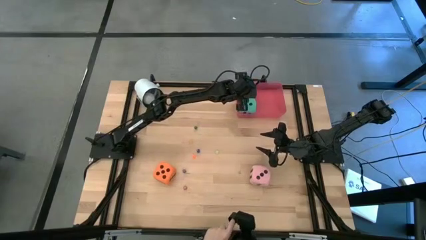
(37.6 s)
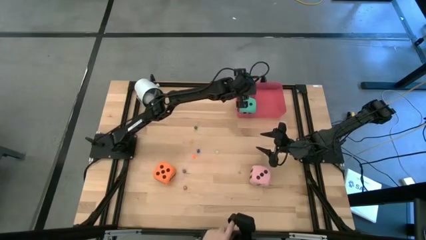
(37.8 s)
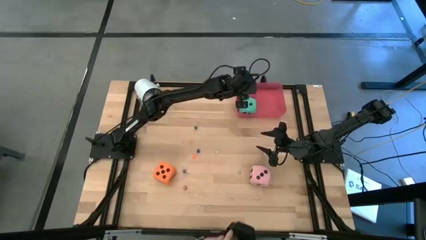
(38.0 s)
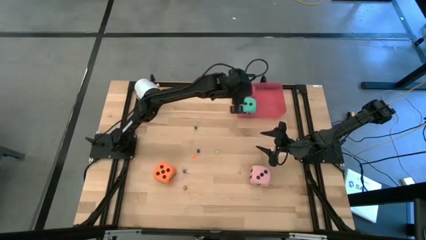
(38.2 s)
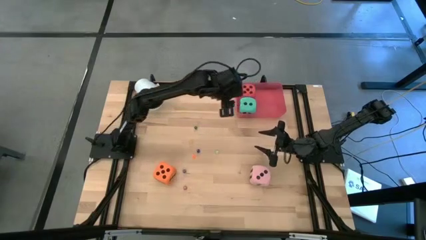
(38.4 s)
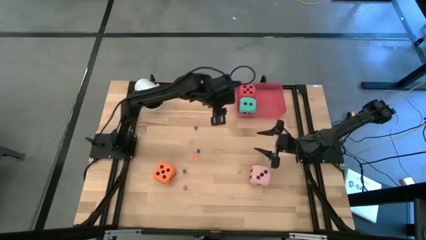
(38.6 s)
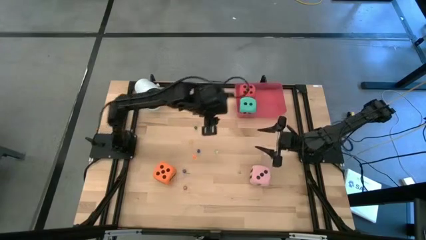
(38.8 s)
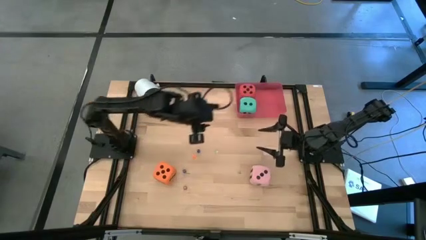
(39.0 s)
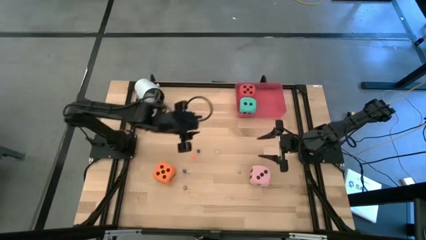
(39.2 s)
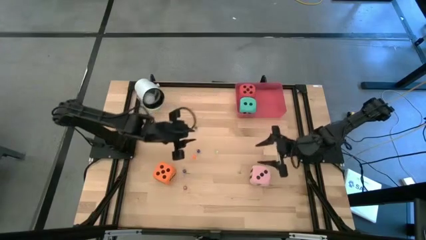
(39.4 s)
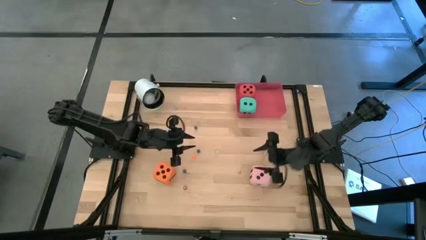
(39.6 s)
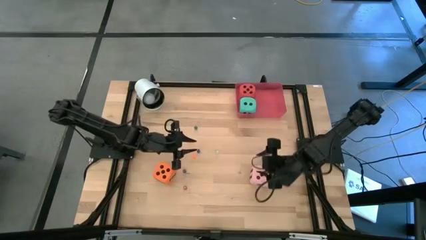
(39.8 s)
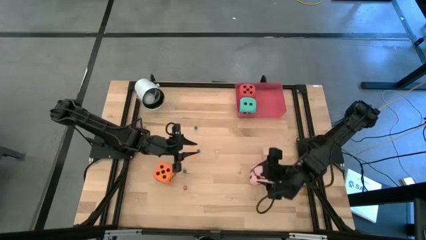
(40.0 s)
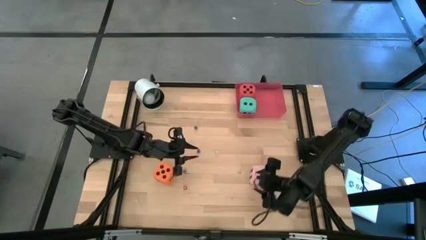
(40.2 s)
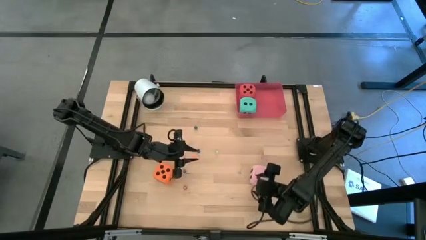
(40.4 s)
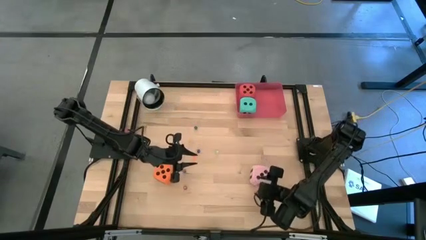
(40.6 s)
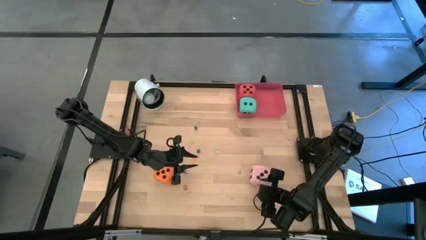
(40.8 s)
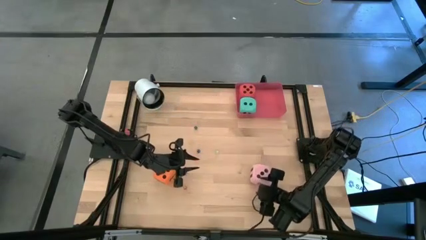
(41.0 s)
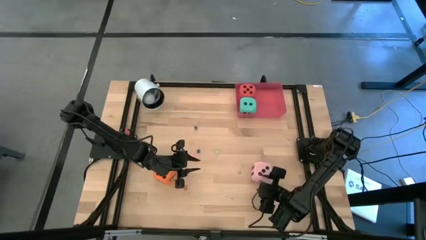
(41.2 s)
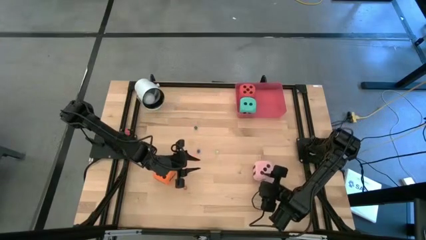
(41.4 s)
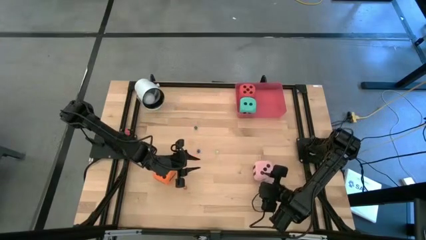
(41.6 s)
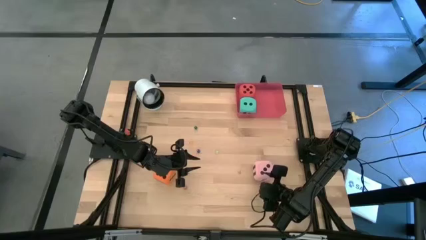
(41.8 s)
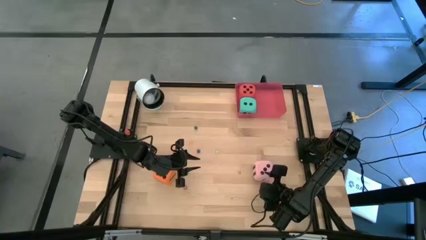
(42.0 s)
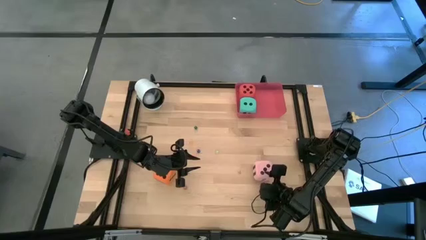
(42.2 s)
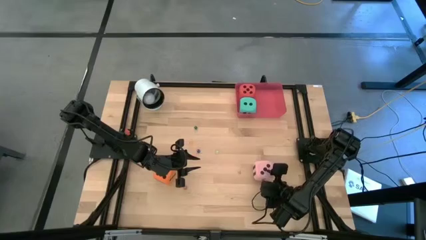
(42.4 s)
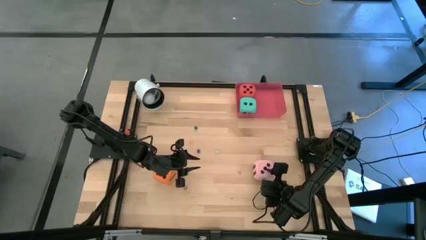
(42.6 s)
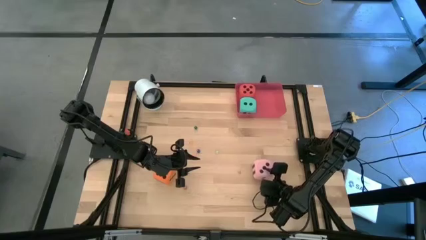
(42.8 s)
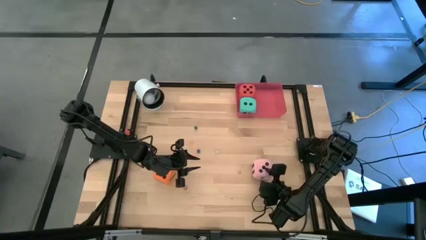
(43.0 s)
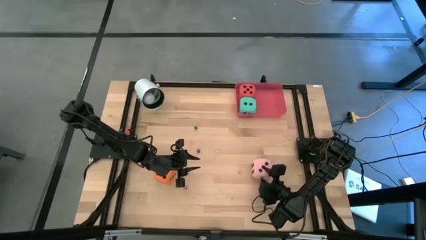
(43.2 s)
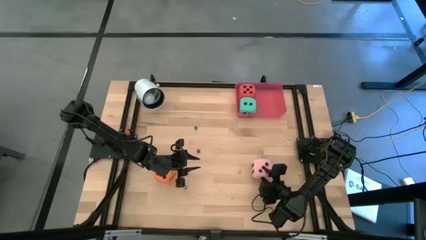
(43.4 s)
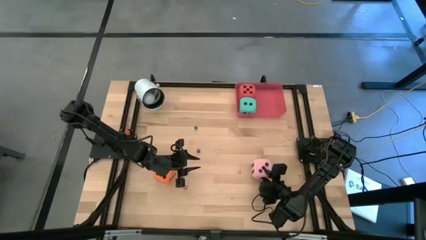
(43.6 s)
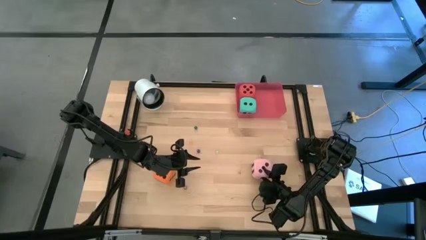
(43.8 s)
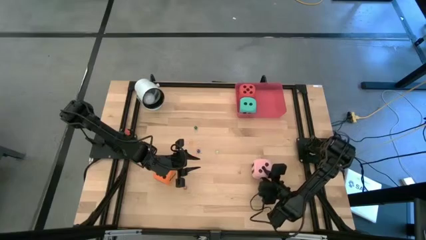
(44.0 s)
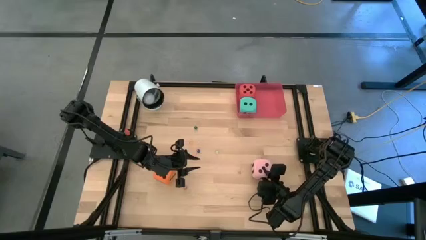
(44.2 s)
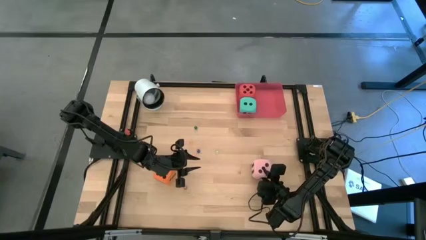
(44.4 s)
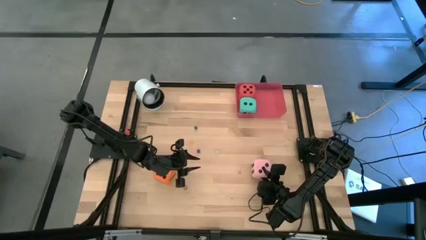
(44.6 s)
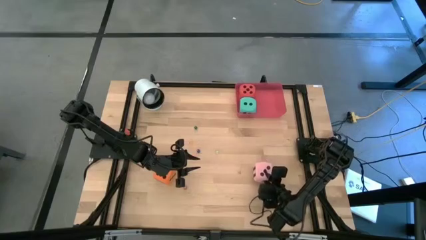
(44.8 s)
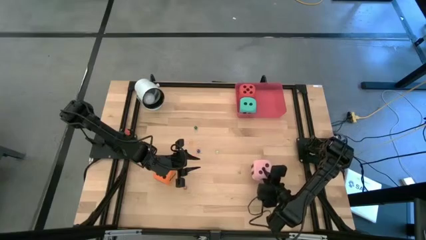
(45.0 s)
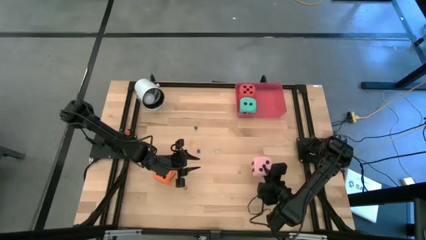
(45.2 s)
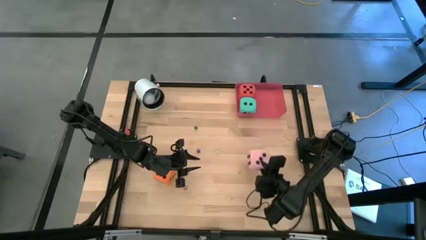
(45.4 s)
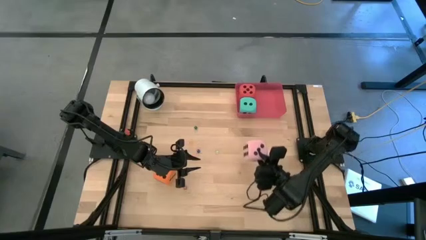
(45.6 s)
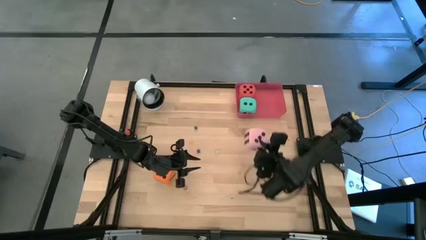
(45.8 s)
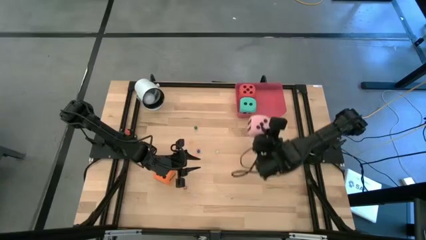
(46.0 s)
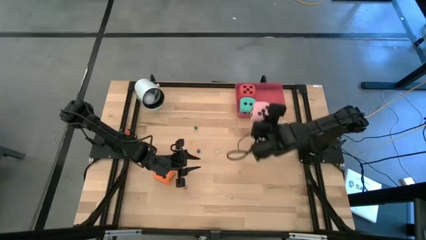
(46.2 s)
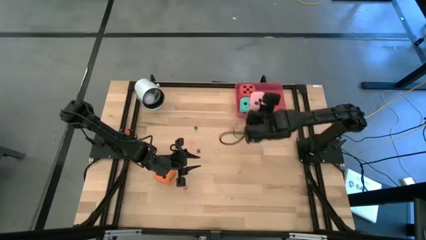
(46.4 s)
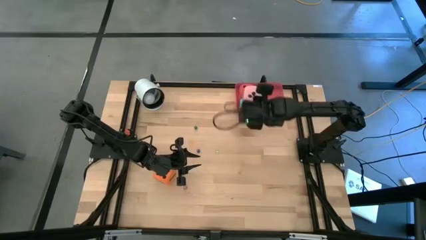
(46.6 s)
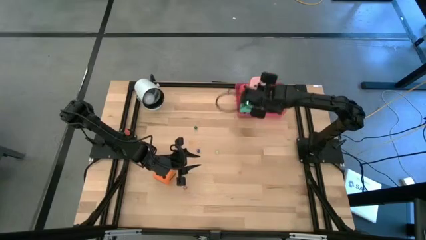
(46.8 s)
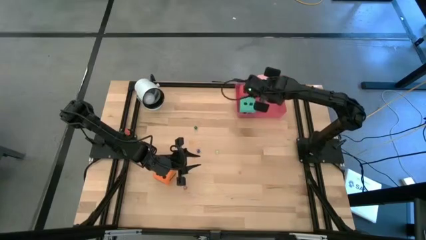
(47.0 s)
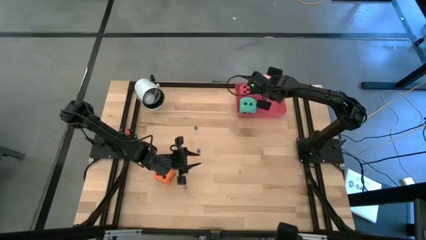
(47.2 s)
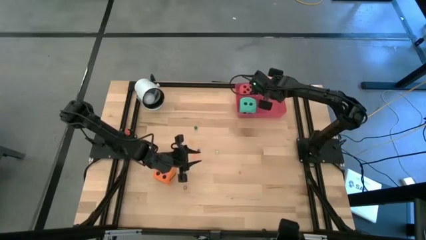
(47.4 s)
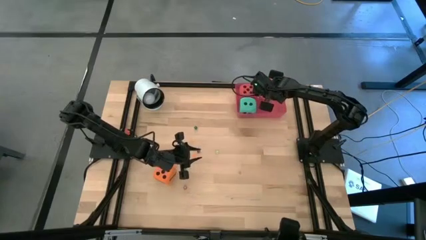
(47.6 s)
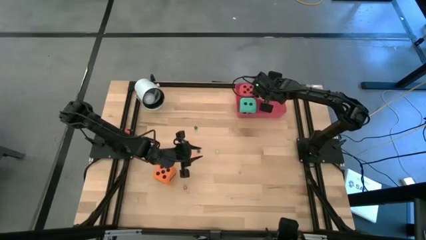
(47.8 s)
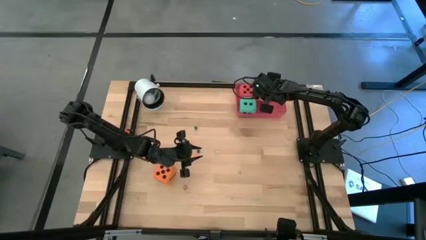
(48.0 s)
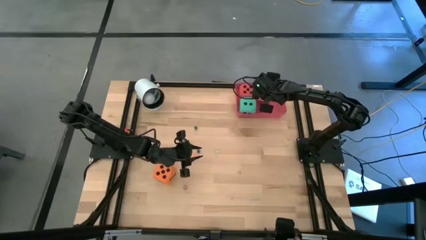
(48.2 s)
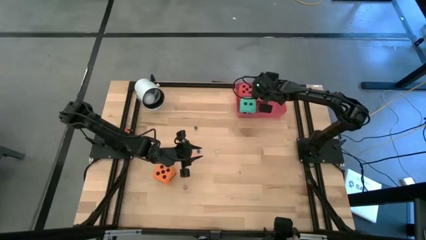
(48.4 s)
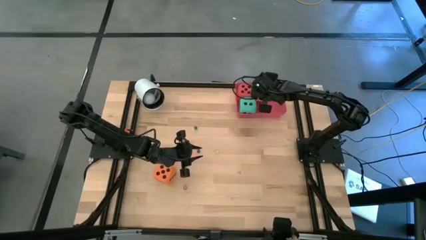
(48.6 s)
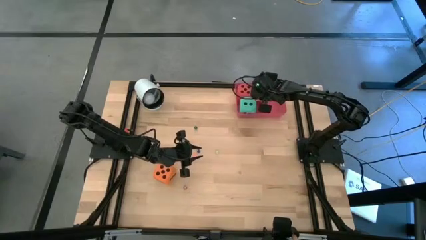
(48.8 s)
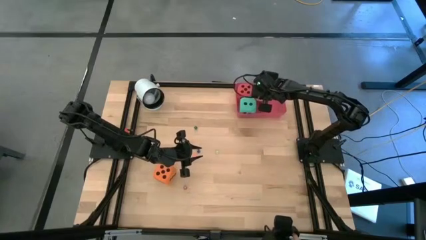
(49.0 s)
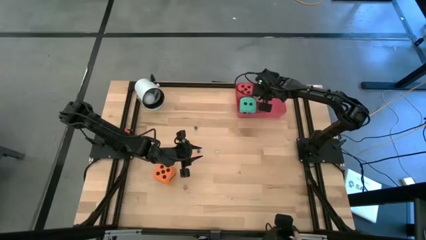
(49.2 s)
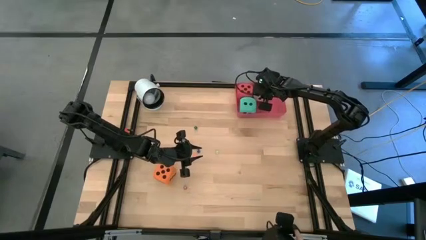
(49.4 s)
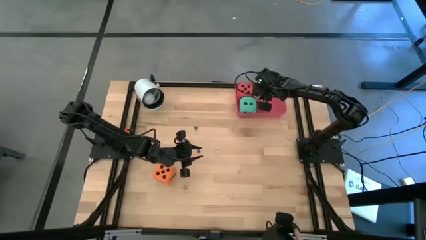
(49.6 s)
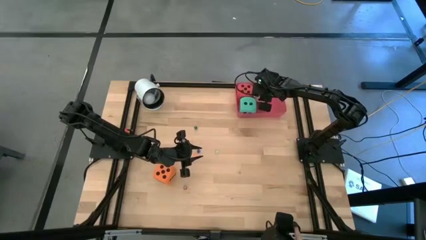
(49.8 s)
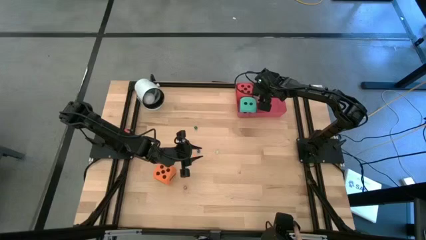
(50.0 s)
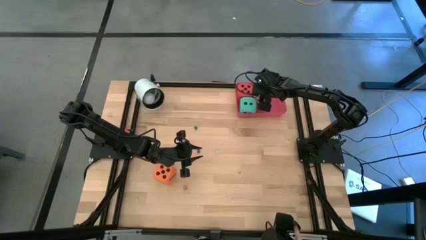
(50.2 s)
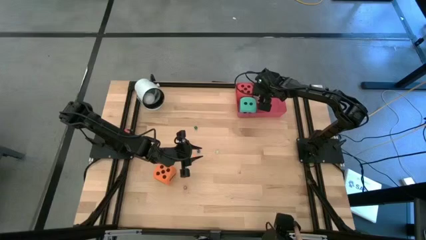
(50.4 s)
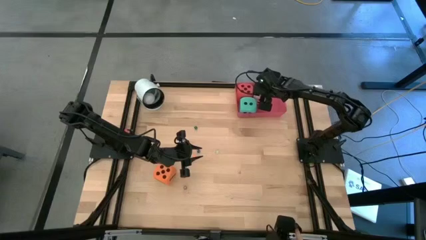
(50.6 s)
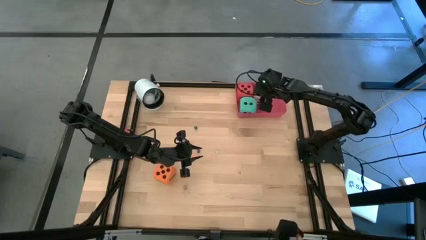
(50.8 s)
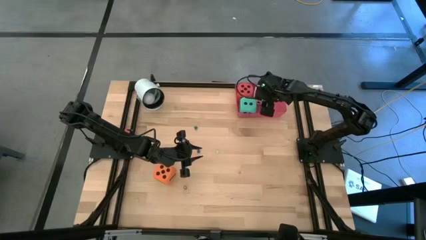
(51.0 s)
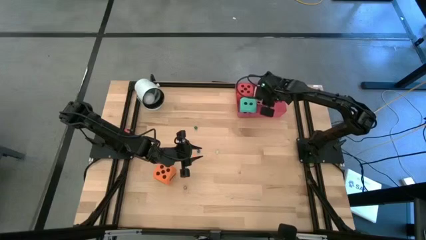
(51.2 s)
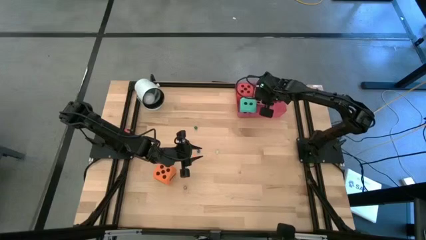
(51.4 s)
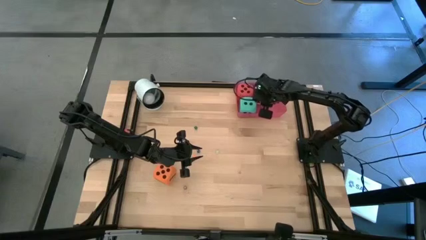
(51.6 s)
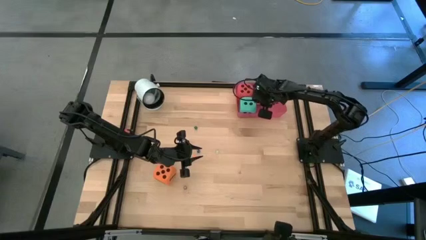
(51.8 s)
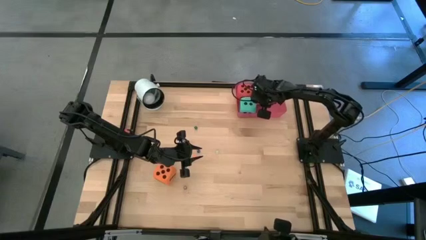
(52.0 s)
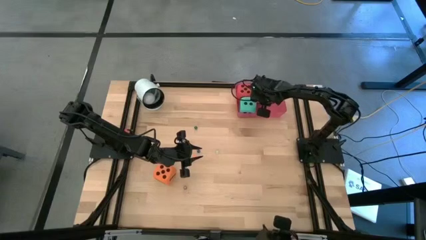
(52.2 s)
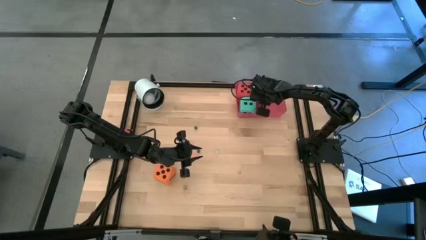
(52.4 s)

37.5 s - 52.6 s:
Task: Pick & Place Dice
Put the large pink dice into the red bin
